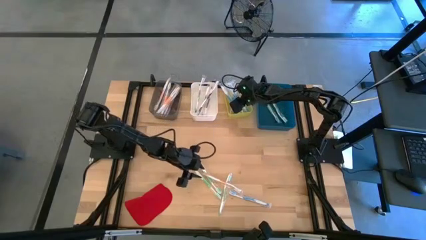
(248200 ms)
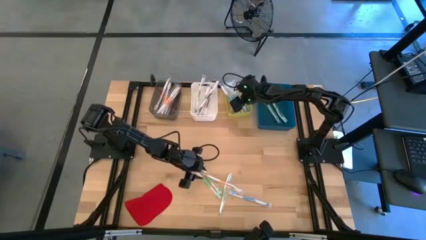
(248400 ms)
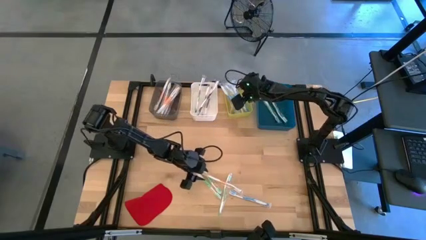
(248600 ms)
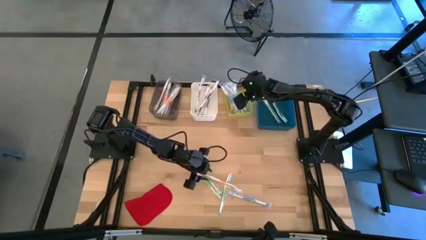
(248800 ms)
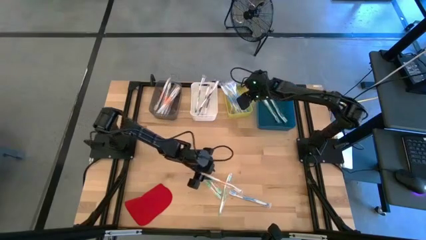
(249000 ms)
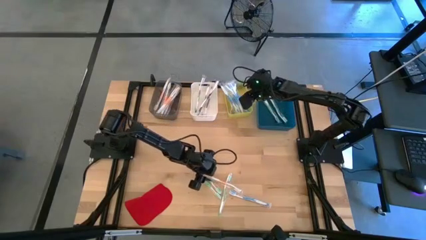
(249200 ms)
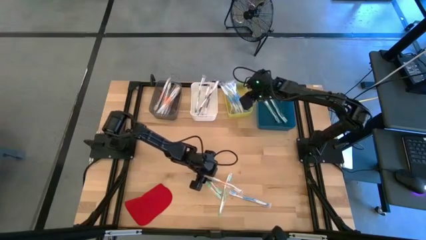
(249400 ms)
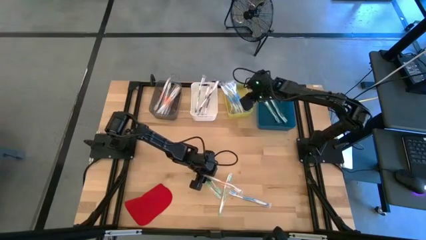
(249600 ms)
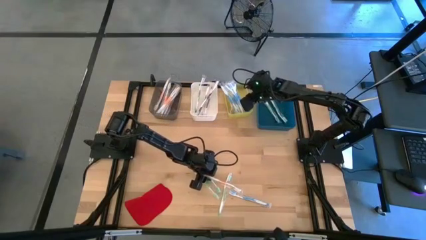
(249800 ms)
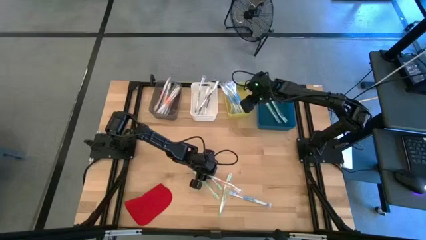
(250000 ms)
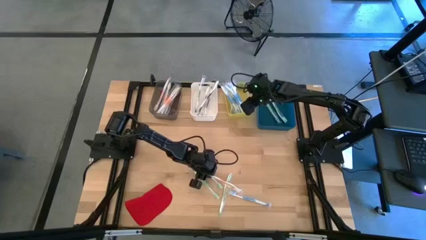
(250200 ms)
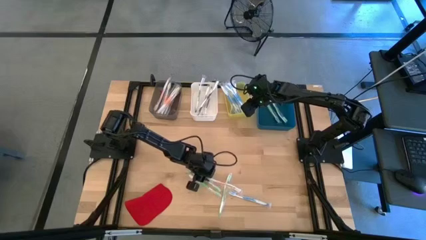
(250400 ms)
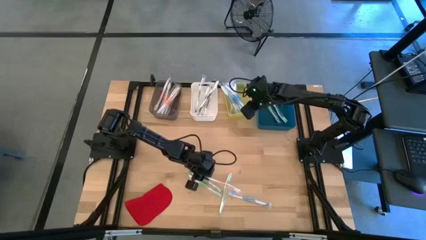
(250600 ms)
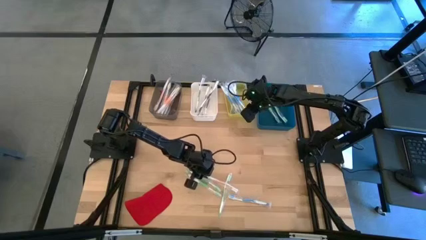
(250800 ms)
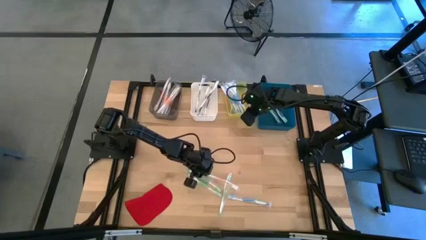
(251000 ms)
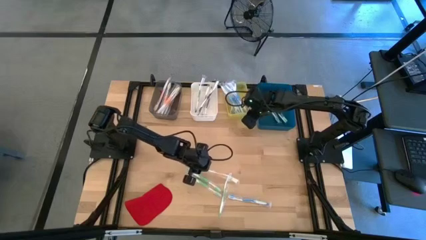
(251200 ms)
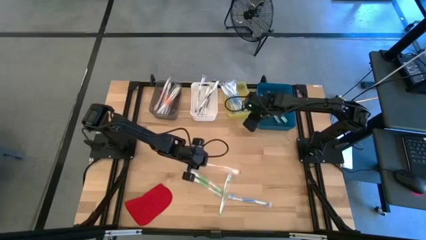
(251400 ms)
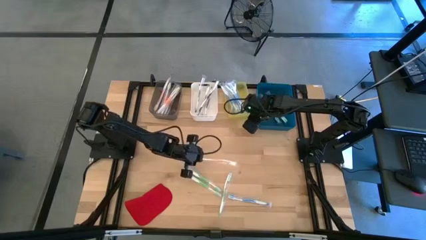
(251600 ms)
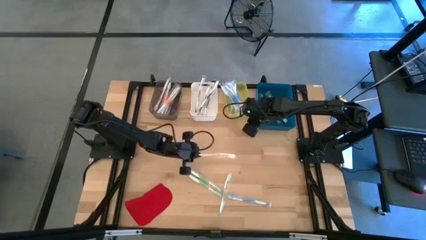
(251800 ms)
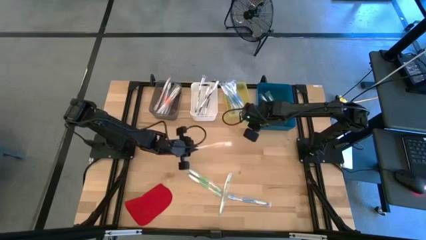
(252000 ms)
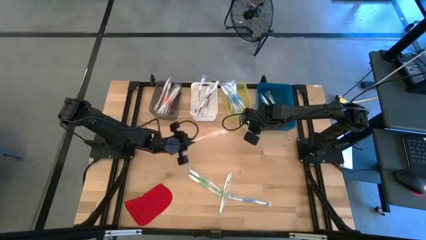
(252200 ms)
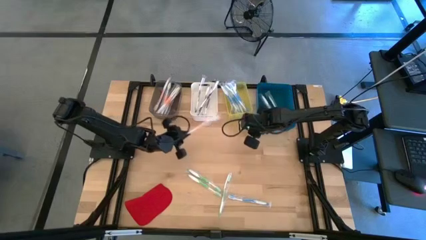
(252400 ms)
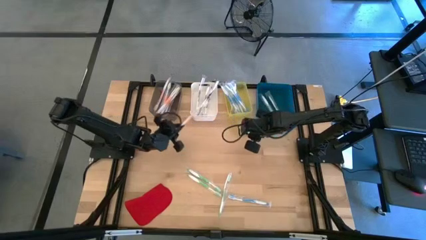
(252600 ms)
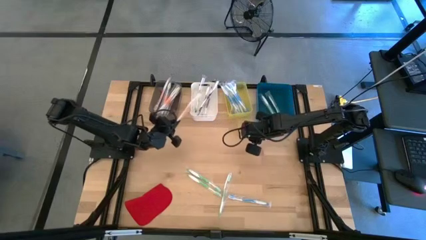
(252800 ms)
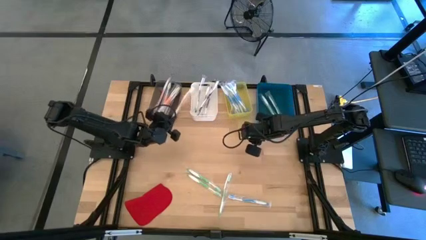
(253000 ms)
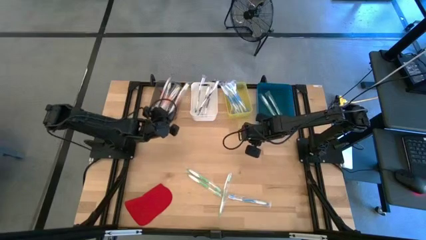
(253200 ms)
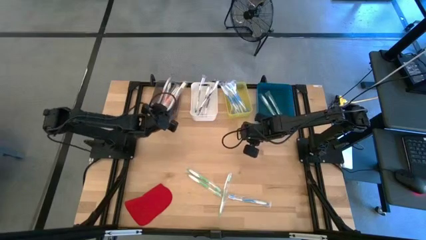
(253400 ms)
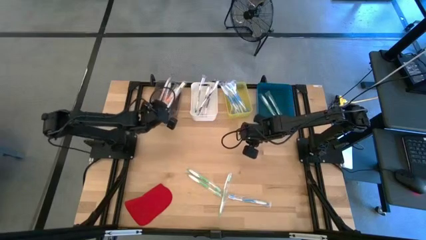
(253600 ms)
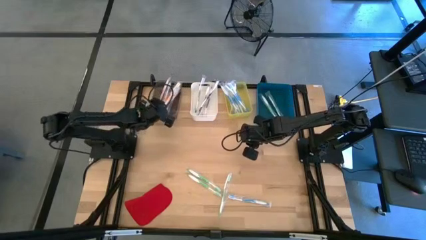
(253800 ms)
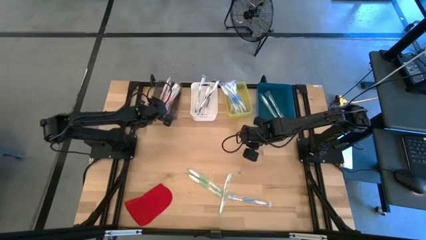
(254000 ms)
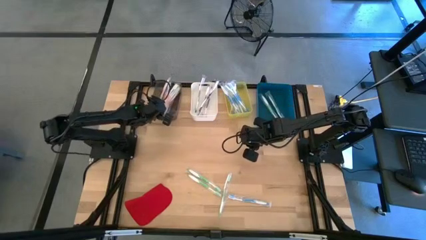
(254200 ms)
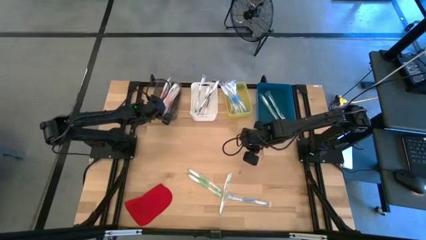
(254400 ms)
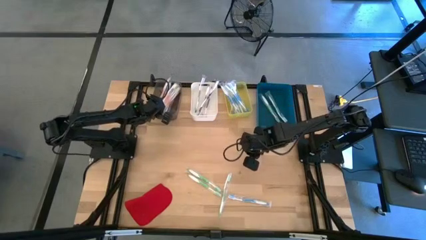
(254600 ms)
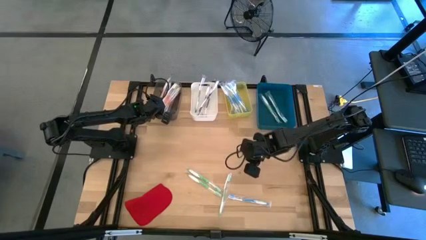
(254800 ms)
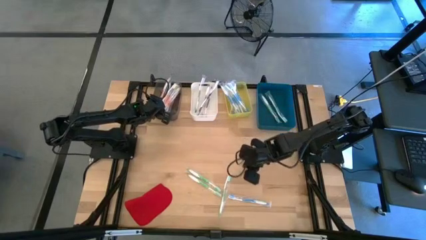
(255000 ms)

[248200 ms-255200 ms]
Task: Pick & Place Toothbrushes
Put the orange toothbrush into the black bin

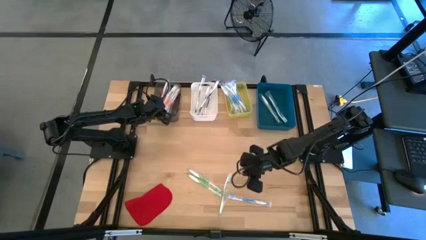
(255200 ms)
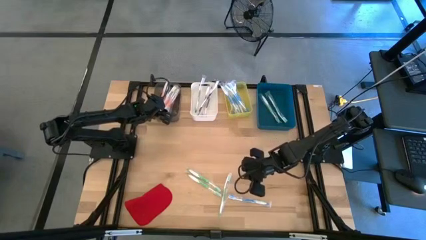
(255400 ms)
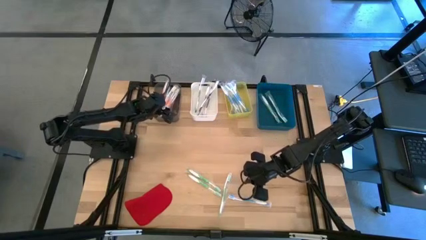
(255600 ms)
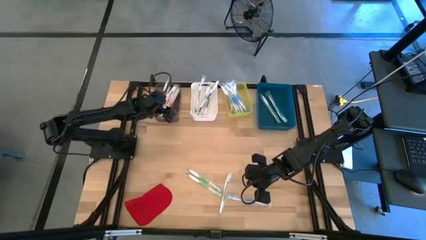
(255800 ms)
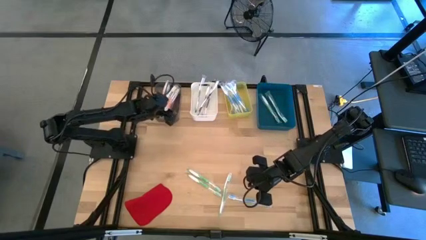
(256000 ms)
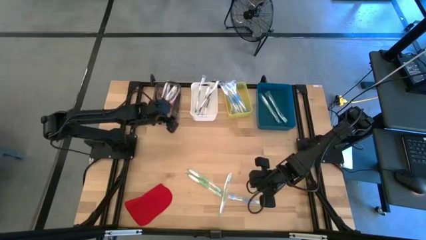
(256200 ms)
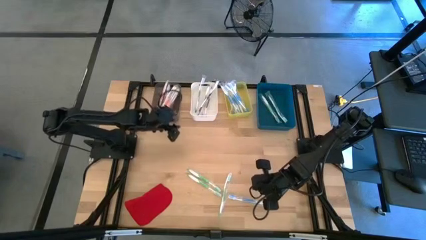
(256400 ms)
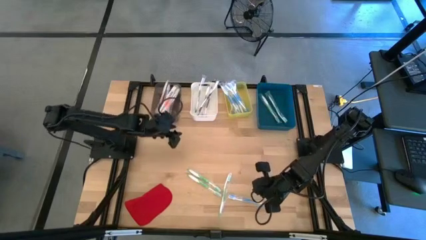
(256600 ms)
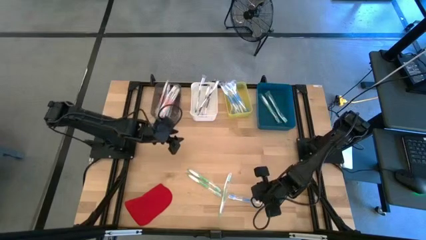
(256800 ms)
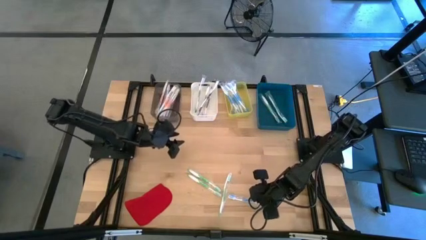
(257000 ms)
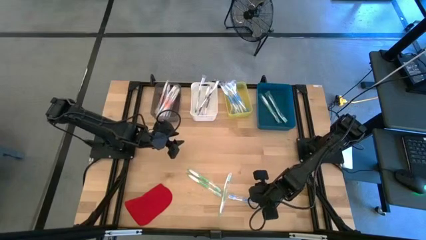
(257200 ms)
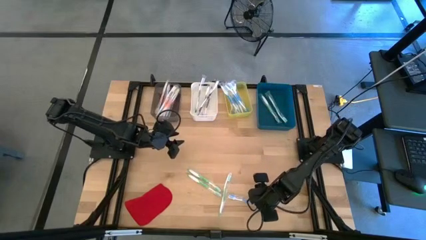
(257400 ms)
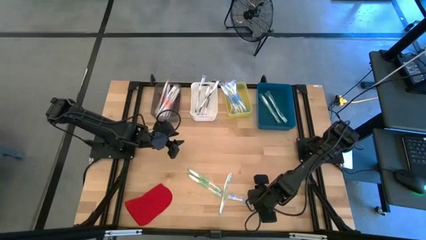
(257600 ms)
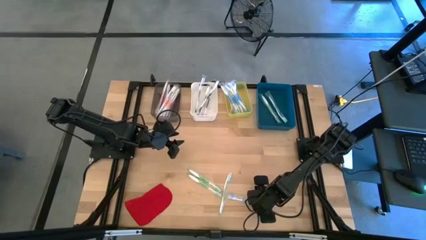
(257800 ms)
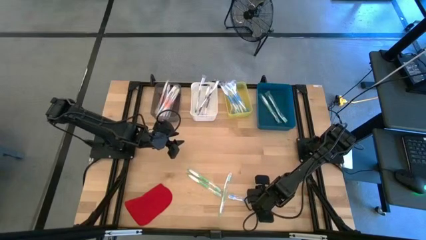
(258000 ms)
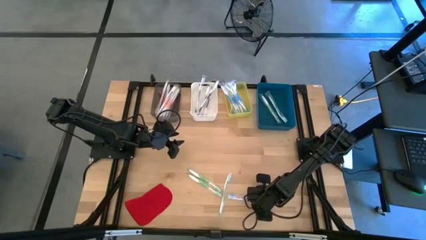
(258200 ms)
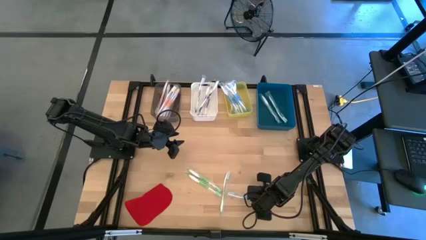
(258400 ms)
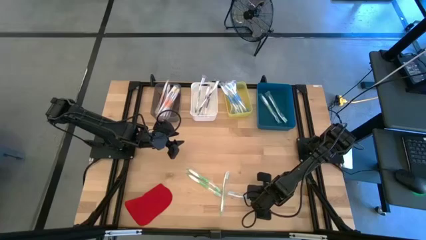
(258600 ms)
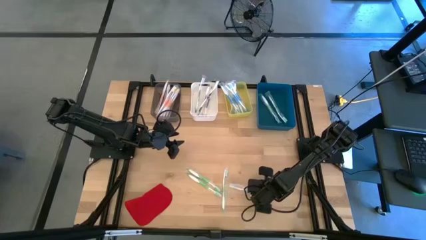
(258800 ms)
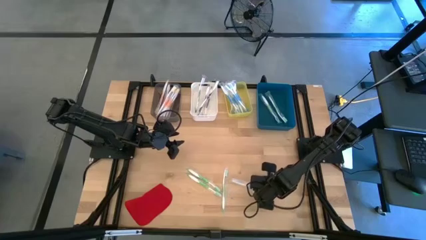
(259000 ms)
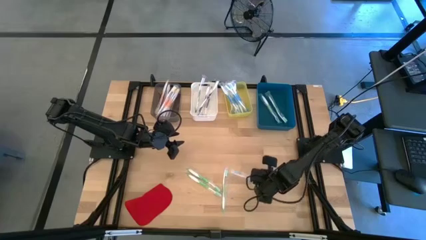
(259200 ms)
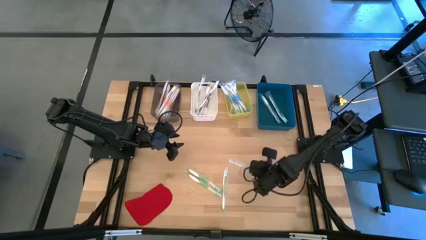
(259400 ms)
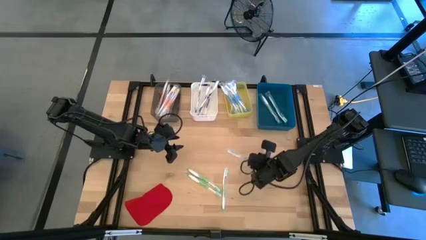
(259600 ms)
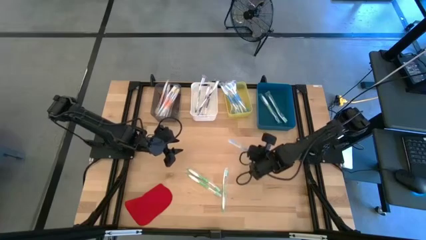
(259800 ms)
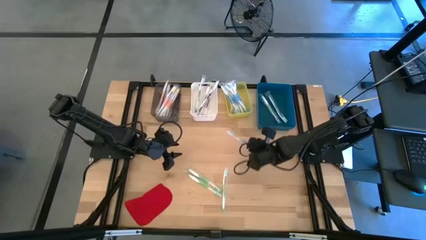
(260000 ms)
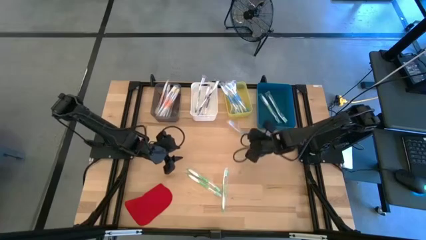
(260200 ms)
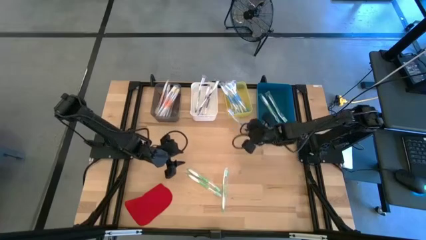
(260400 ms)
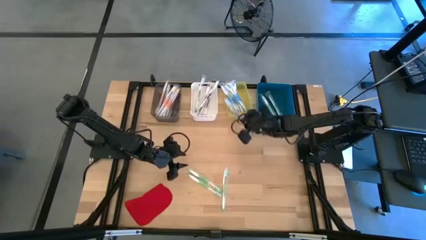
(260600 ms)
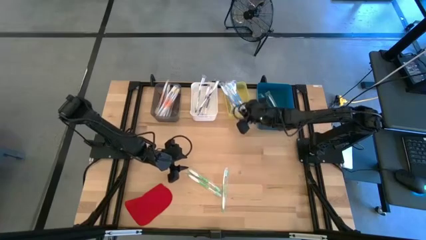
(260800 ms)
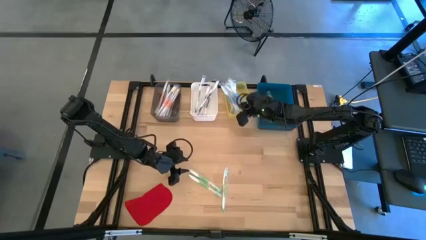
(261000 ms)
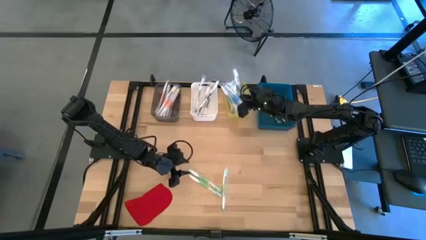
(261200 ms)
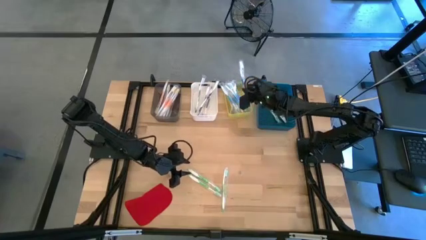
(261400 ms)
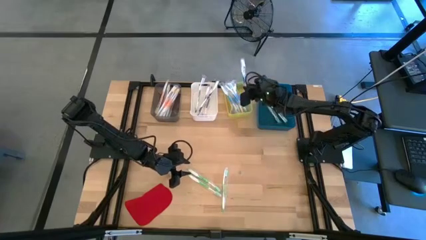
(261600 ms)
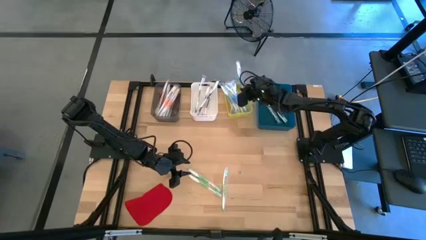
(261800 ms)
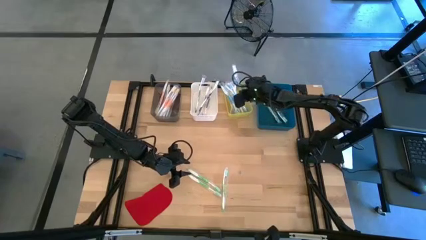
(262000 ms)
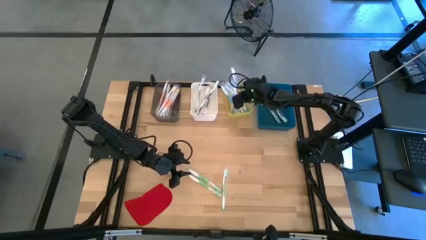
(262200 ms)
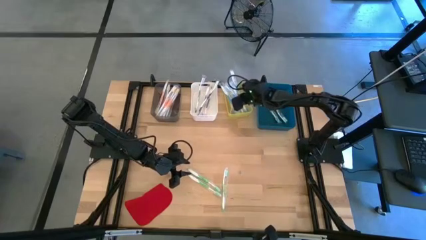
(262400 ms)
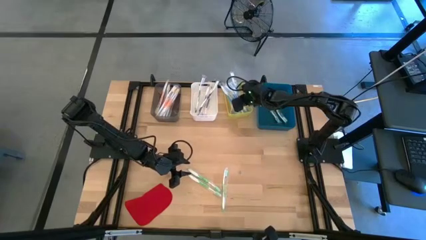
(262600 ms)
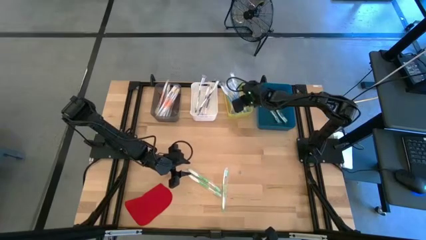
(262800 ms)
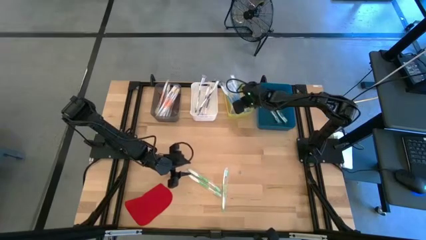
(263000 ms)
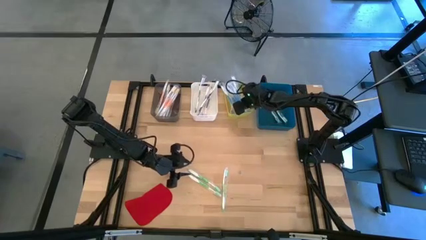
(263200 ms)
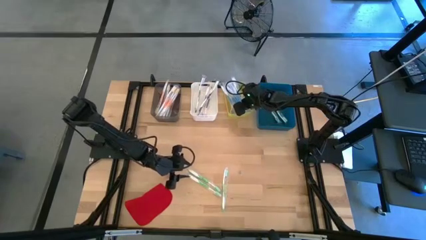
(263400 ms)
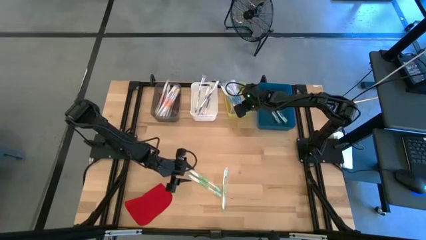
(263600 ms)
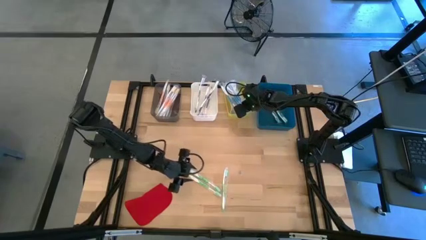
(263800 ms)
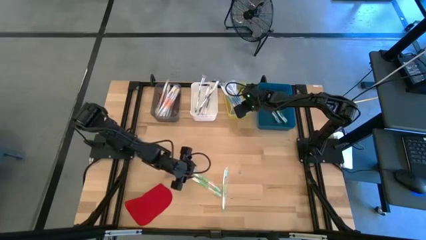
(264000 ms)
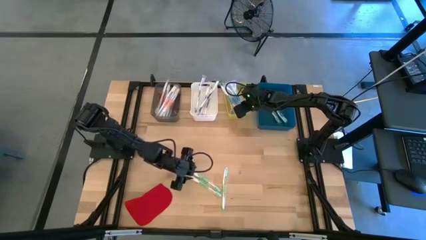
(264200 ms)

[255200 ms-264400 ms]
Put the blue toothbrush into the yellow bin

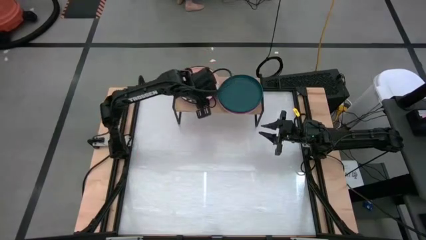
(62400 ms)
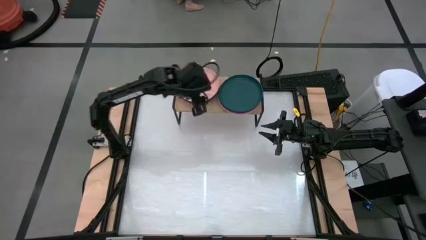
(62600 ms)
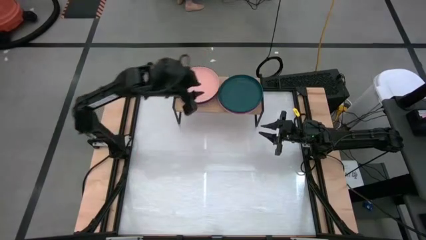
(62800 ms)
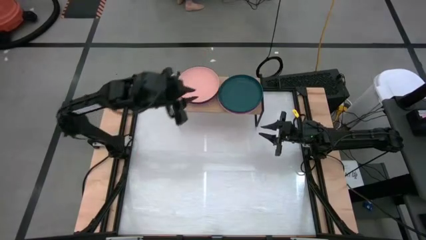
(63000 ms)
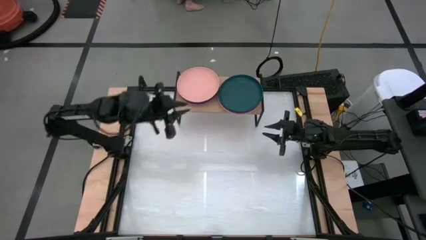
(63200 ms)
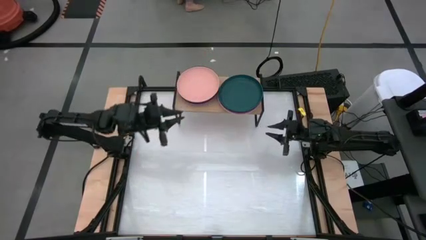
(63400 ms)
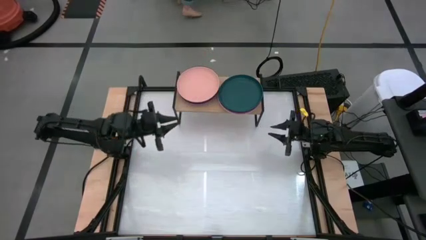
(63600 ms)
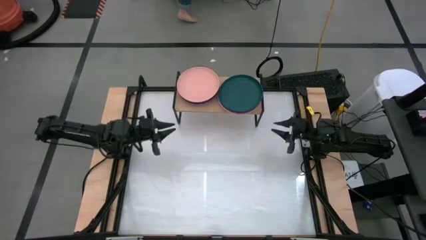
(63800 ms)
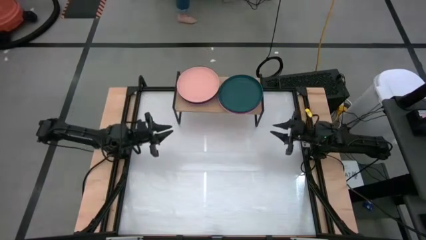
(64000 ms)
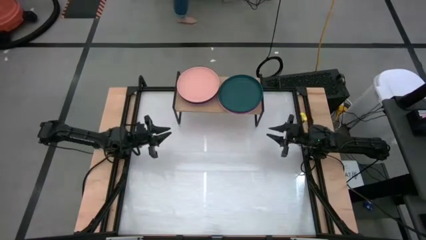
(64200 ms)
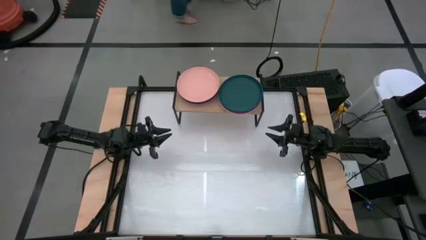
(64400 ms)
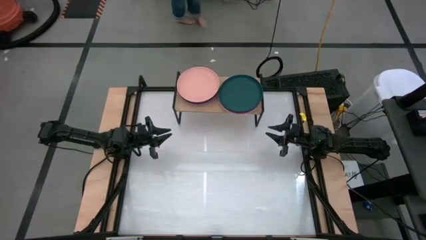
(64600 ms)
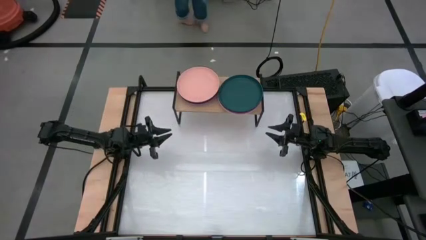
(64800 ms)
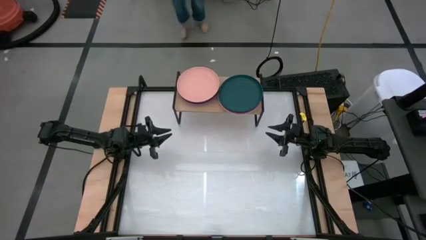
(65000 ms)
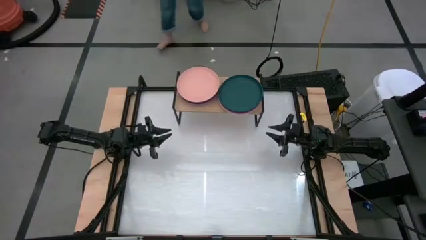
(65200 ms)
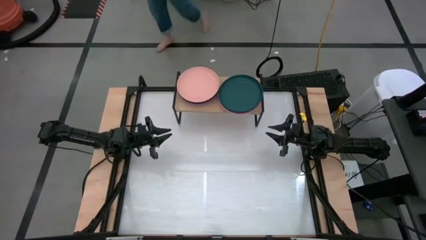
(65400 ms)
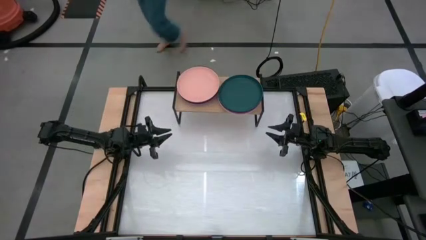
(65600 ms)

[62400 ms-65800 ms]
Task: Place and stack plates onto a shelf
Return to Home Position
